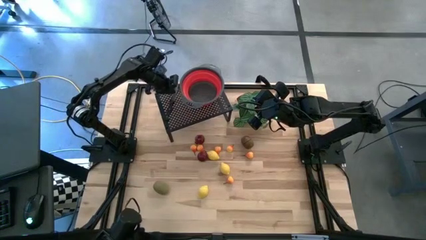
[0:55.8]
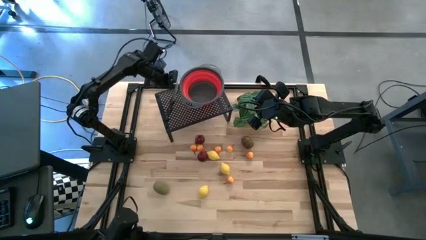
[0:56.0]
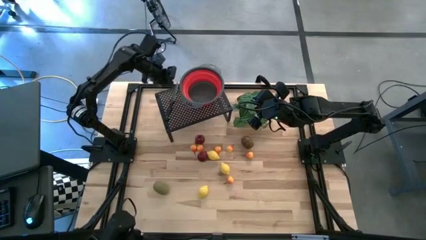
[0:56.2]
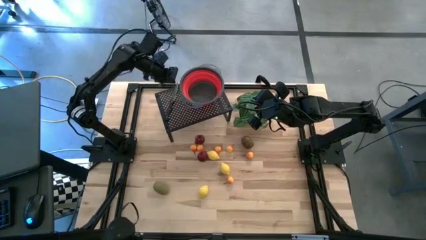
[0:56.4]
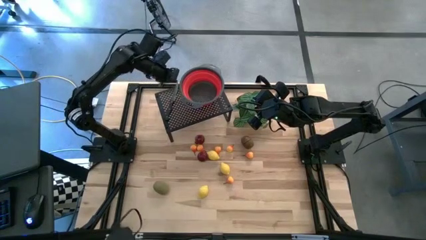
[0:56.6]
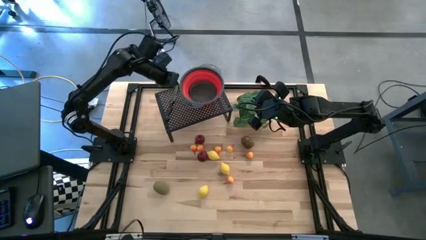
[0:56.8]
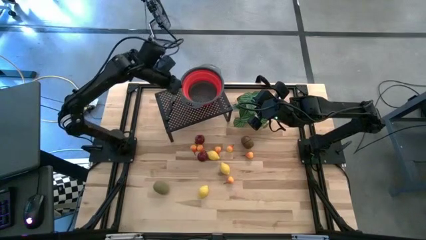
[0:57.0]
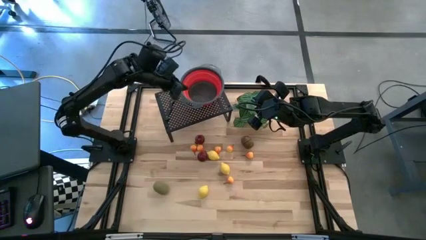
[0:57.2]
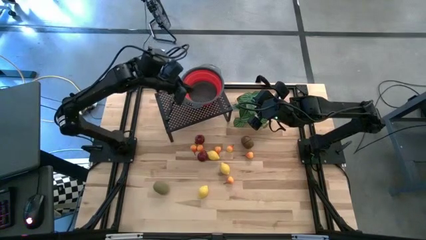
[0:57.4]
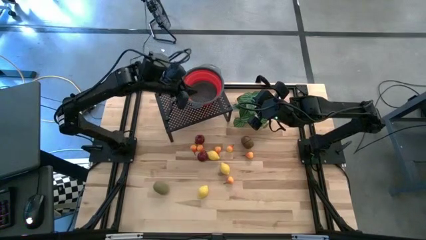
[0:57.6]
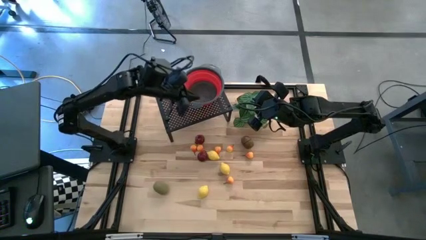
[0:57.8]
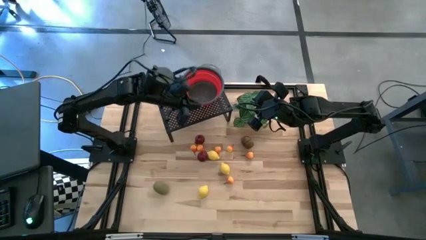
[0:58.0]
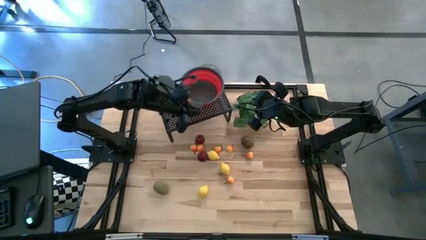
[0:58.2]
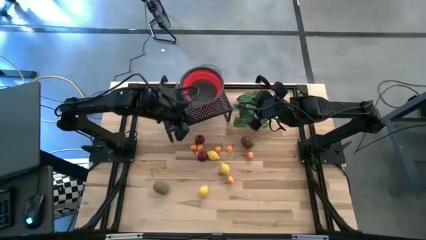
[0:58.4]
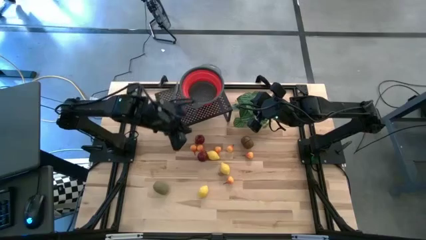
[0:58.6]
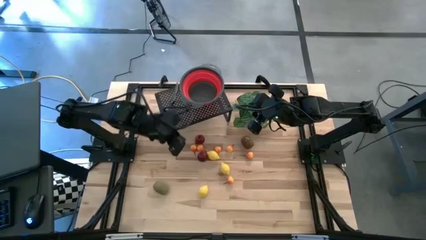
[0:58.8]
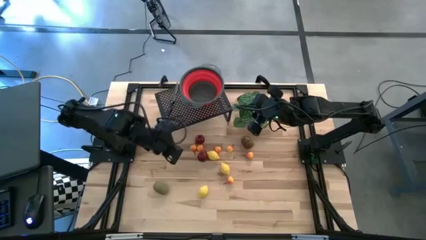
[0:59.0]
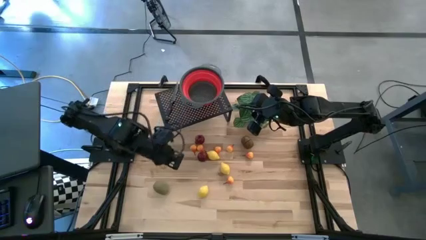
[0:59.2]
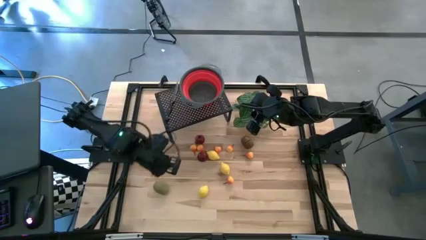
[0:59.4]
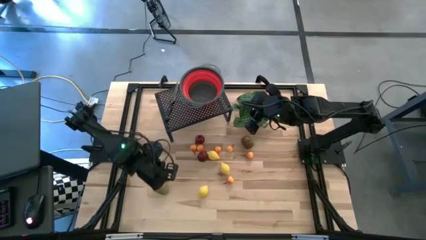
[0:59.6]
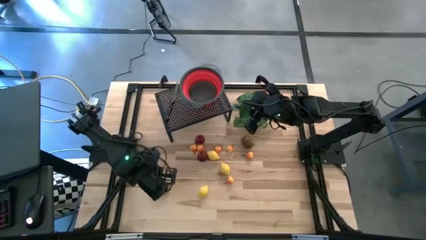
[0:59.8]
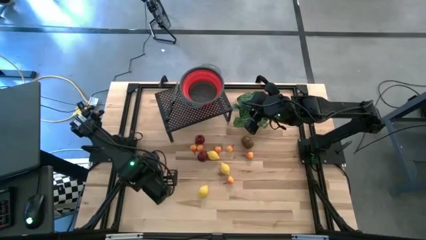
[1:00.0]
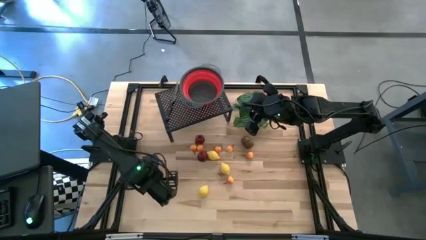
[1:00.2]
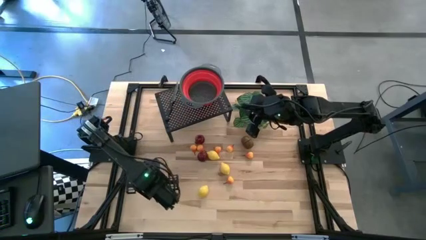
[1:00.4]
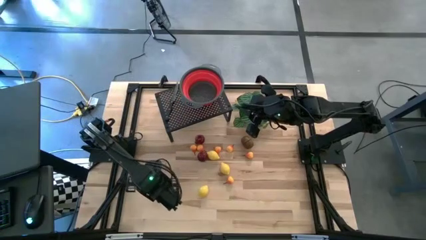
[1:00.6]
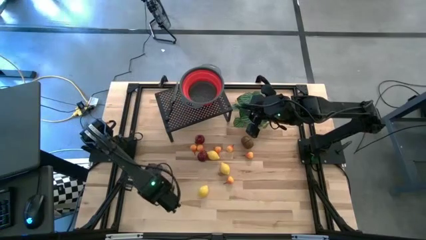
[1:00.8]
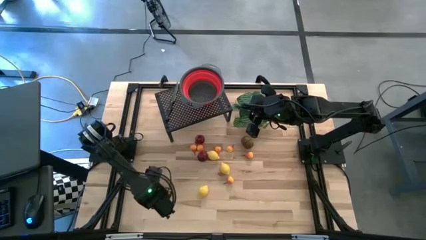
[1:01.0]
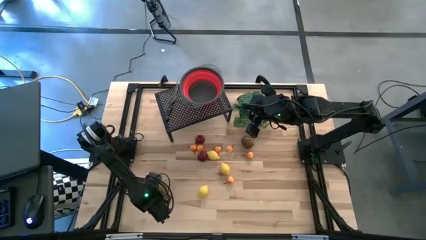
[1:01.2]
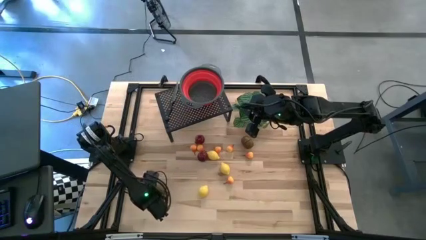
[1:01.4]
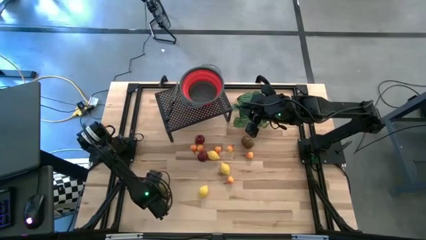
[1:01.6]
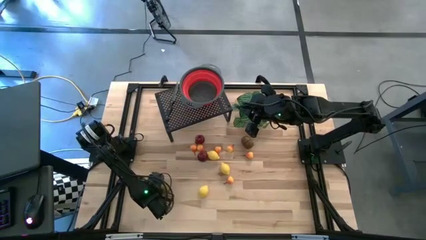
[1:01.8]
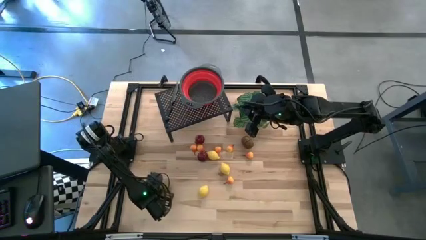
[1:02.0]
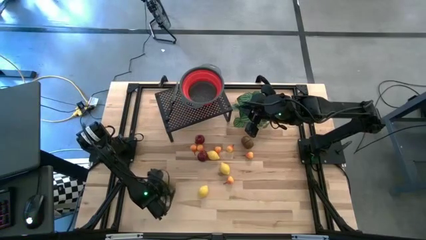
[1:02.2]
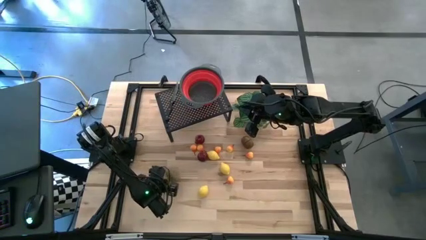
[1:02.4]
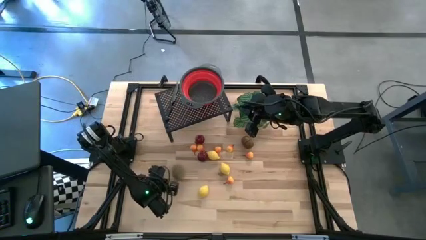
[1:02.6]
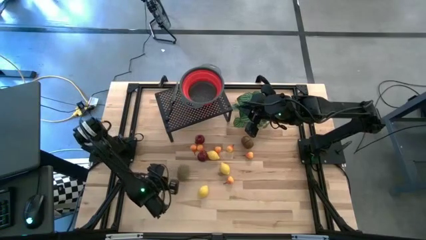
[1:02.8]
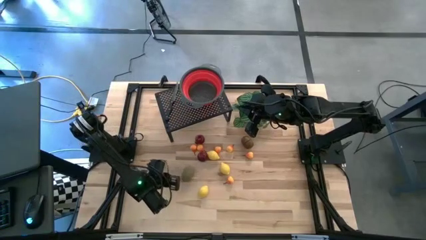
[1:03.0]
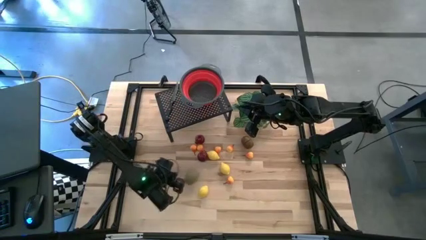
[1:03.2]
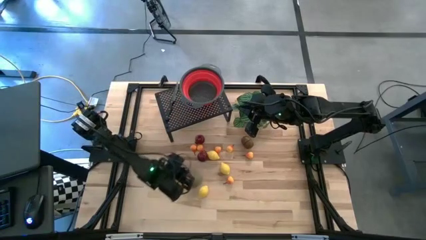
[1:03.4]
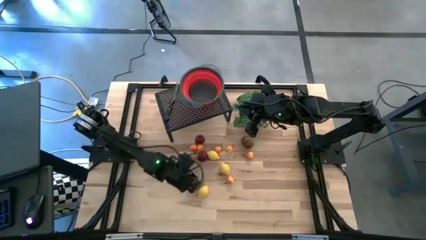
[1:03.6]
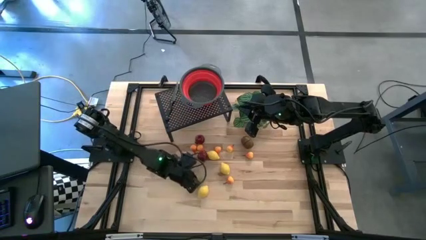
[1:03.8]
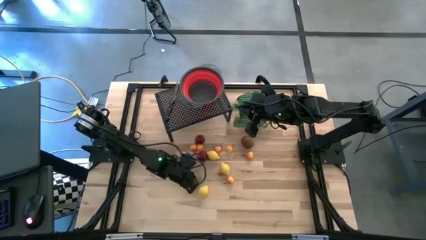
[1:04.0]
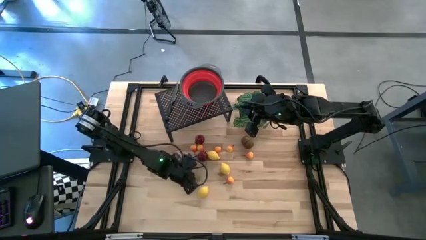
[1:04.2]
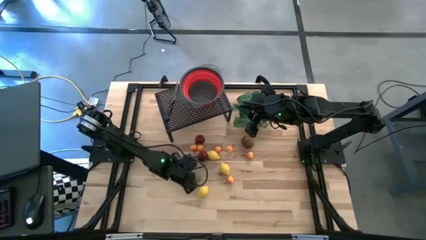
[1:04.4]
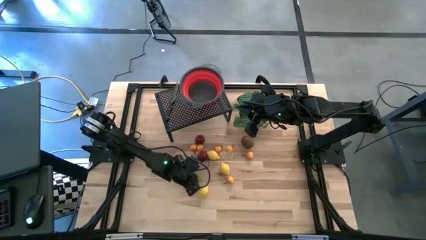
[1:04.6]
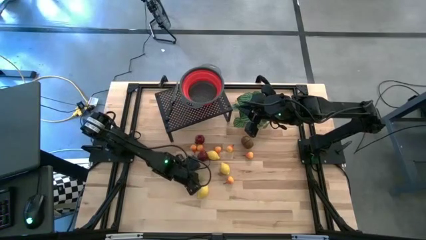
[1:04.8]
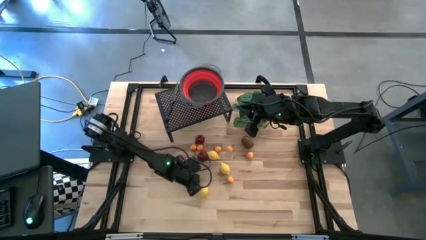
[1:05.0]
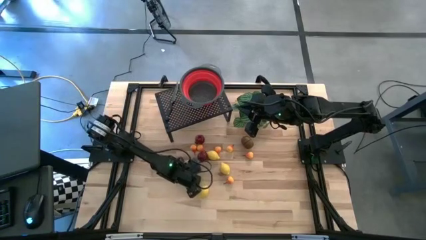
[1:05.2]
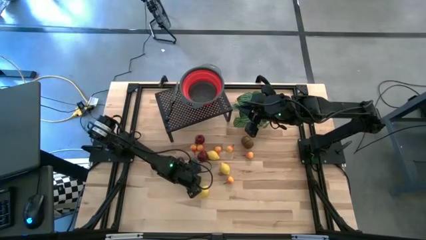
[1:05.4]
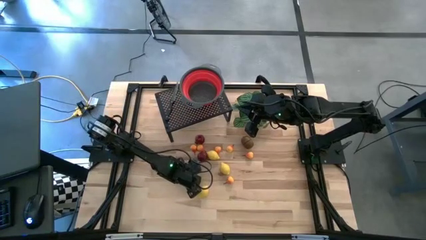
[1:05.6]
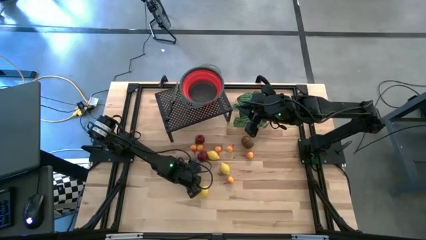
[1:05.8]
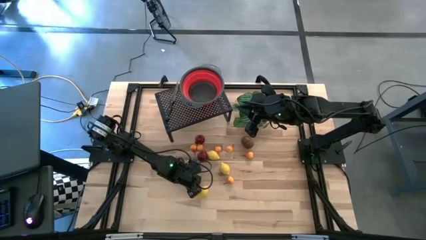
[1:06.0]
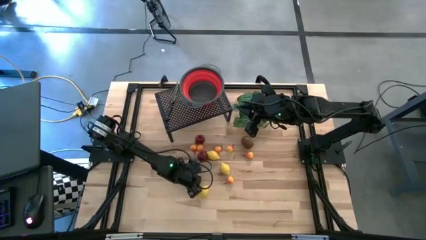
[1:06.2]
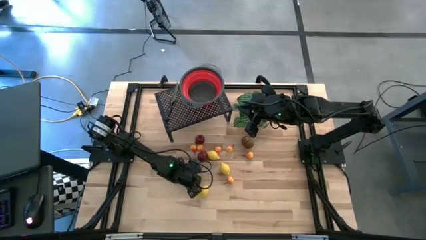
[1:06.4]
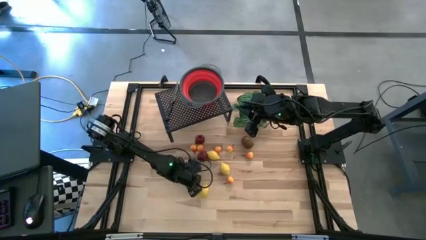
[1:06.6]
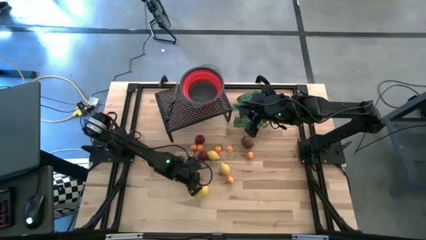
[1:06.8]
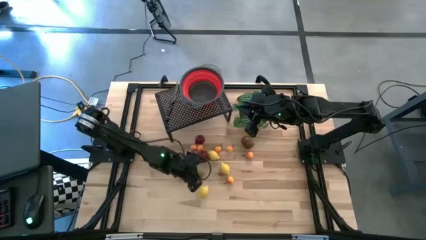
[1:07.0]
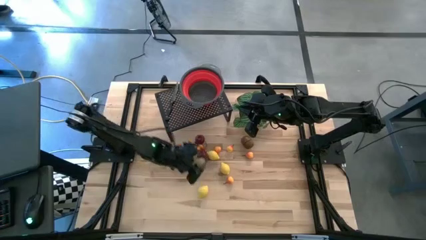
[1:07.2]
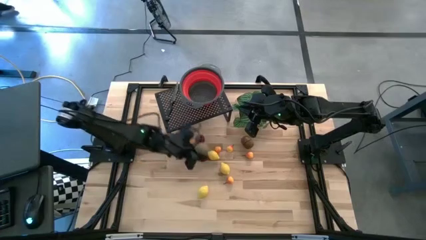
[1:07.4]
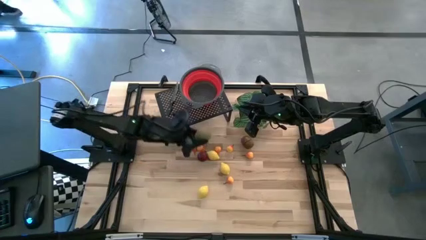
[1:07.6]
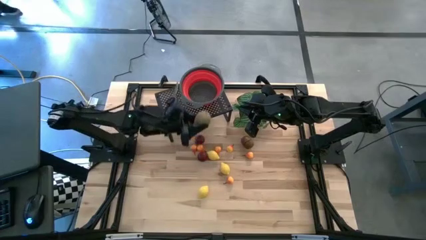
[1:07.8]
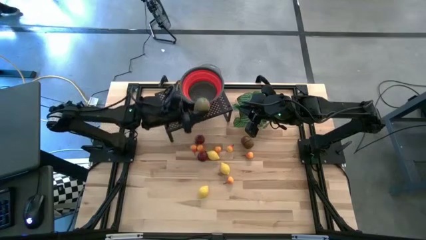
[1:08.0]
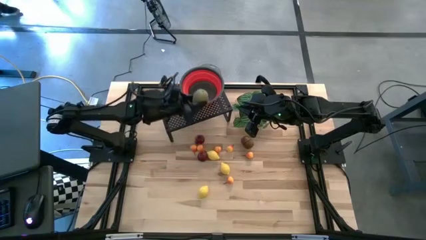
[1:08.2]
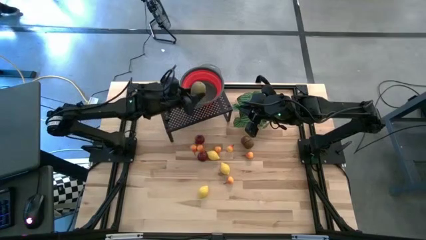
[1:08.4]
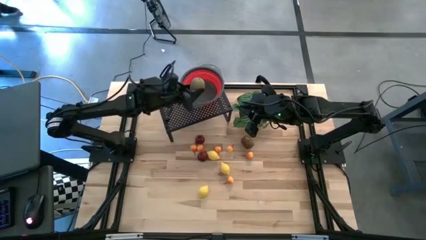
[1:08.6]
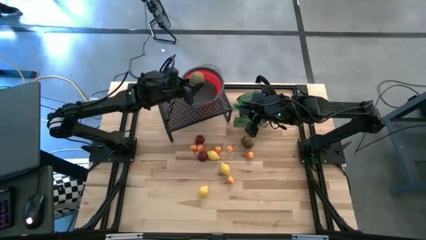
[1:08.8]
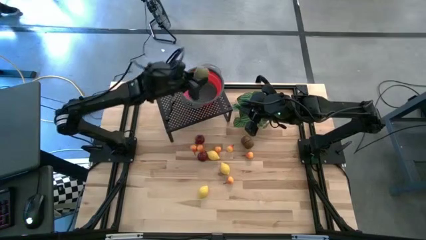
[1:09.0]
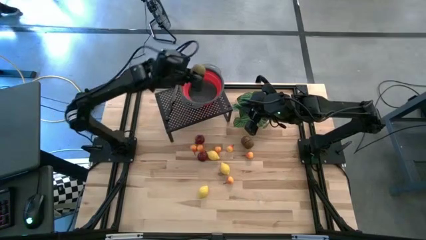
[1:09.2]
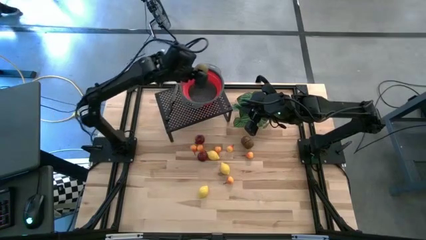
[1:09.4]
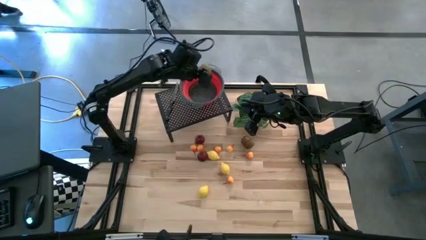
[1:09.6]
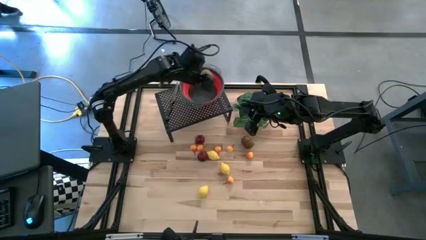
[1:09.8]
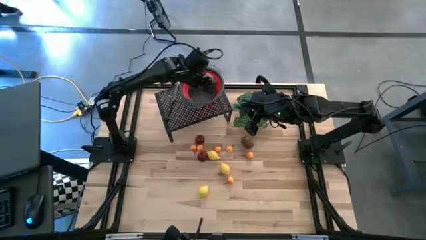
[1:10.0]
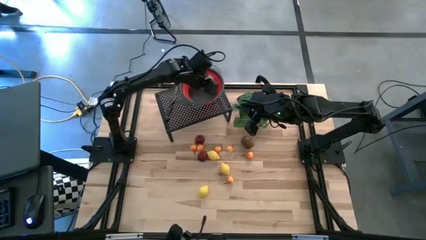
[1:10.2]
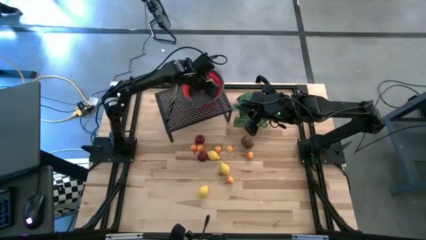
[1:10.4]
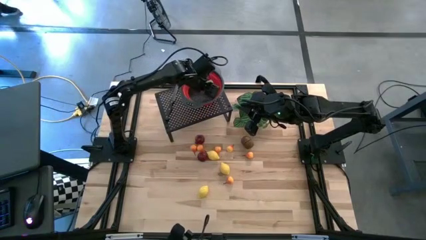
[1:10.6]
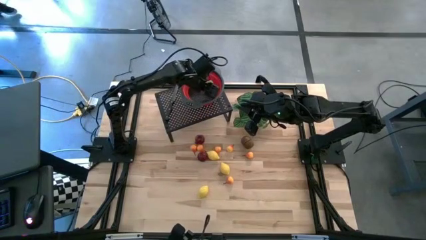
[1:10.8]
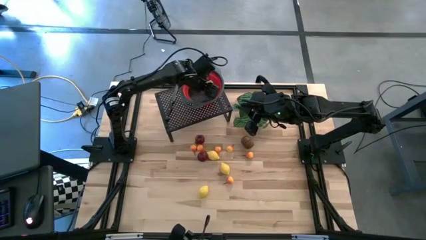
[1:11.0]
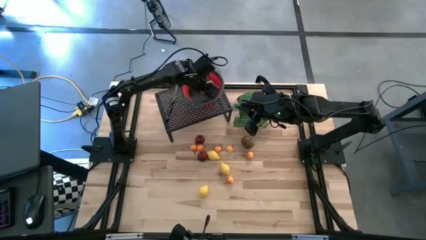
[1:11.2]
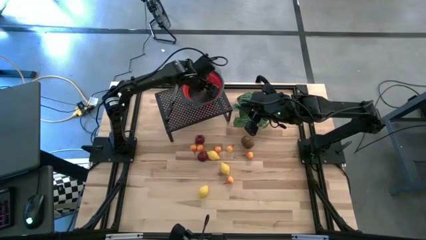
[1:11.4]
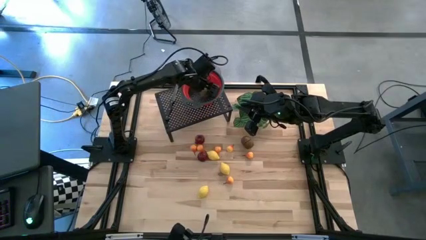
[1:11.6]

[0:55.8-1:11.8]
Task: Pick & Place Fruit
Put the left green kiwi into the red basket on the shelf
